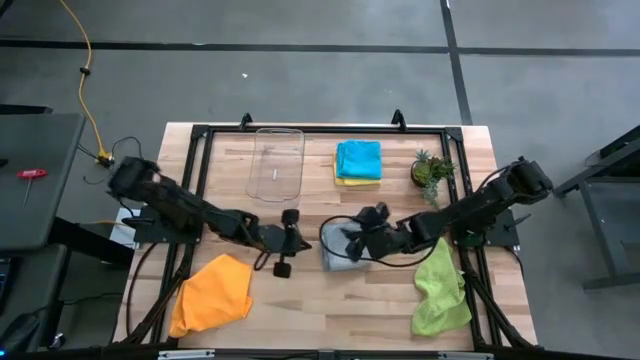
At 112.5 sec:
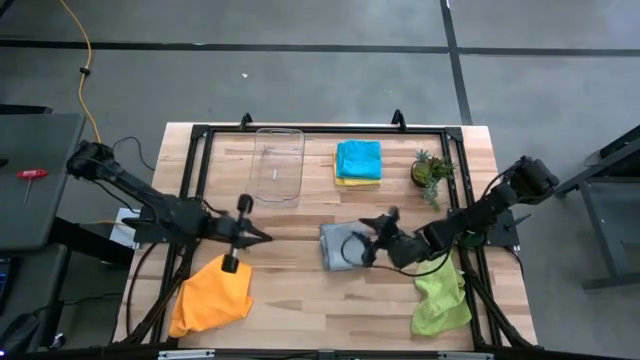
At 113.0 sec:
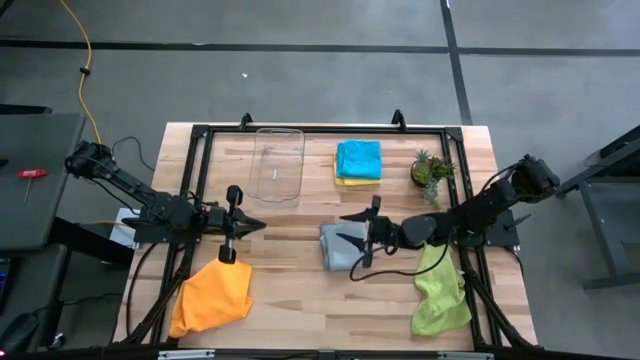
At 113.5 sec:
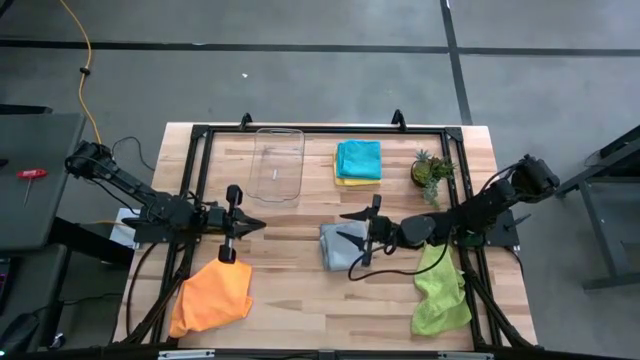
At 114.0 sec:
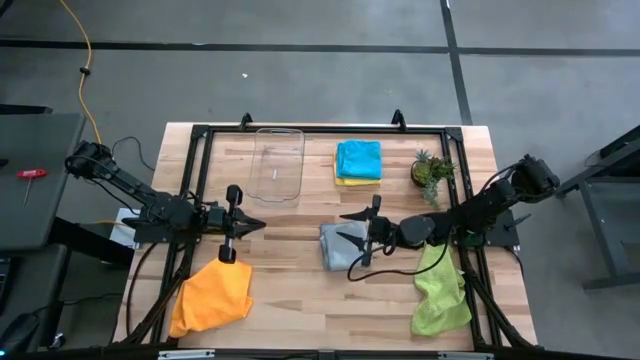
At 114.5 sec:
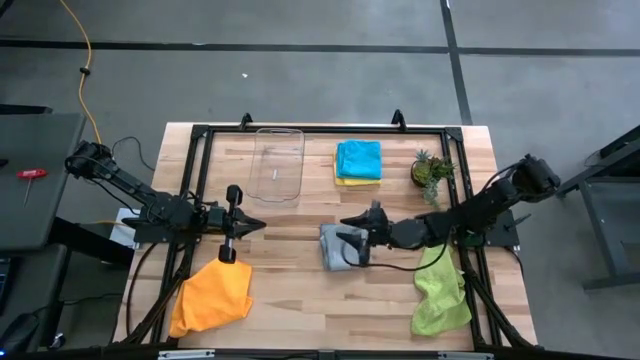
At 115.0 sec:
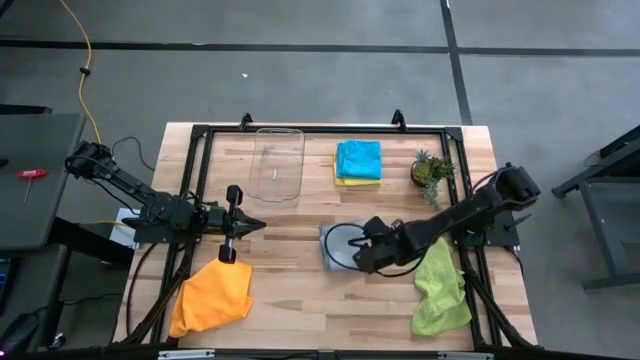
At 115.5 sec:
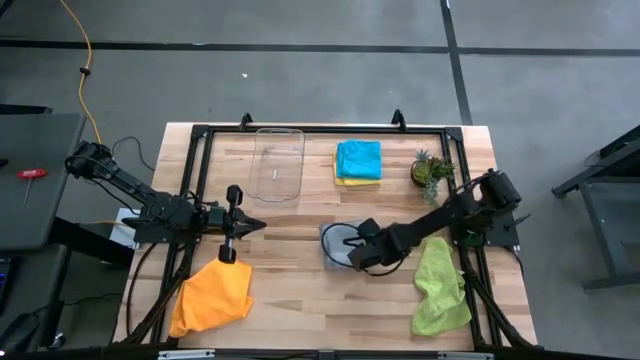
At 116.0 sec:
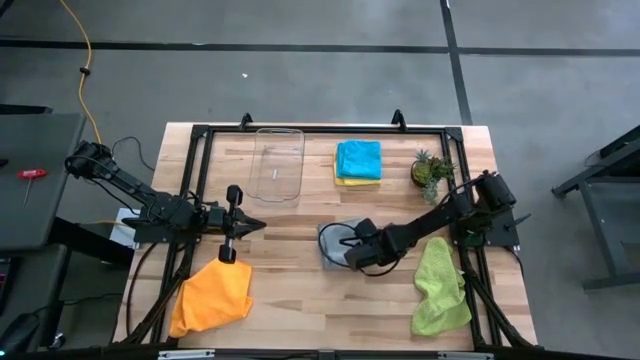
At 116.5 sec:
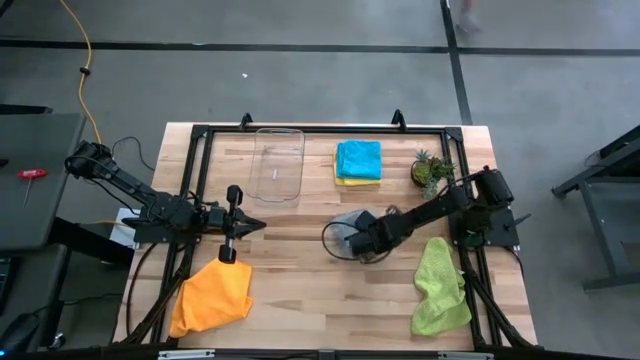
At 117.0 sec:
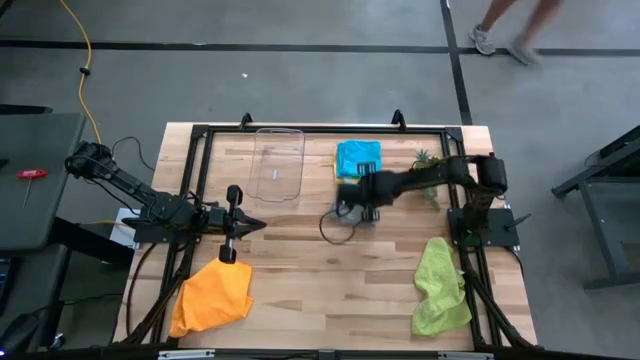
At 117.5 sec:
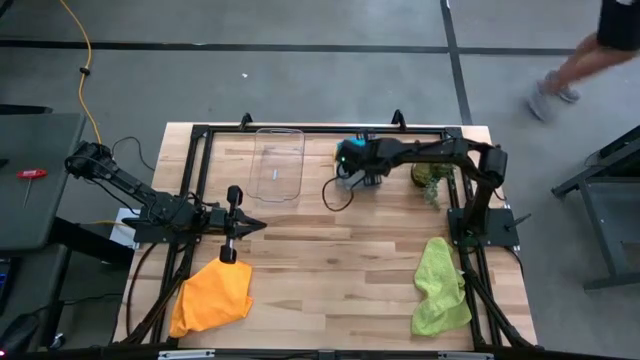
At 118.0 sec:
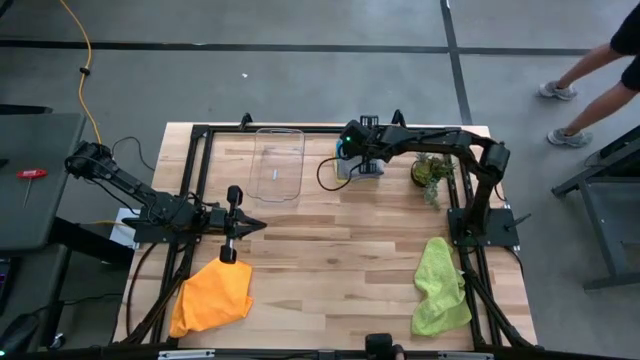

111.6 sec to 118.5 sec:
Task: Fold microfiber towels
Stack the gray microfiber cloth on the blue microfiber cloth

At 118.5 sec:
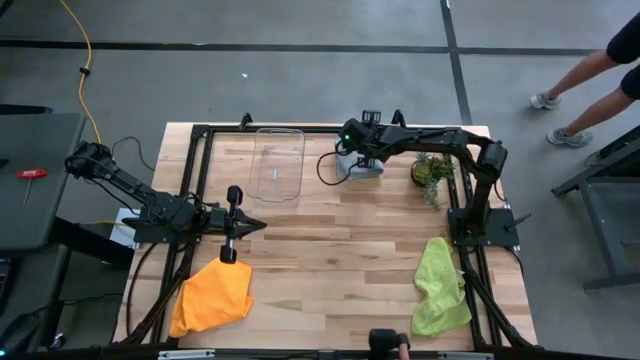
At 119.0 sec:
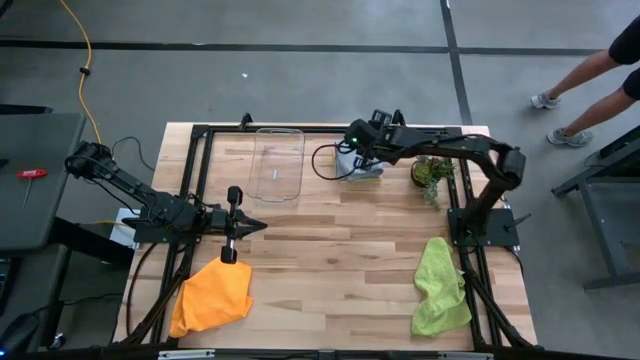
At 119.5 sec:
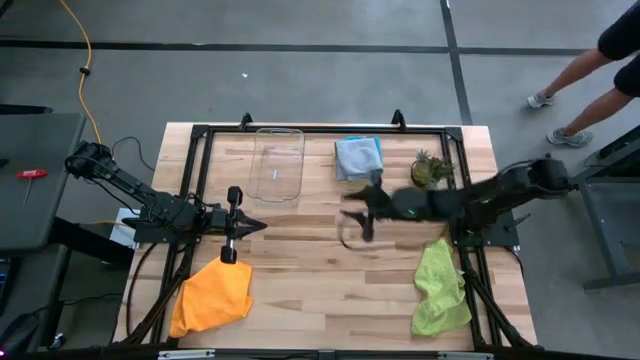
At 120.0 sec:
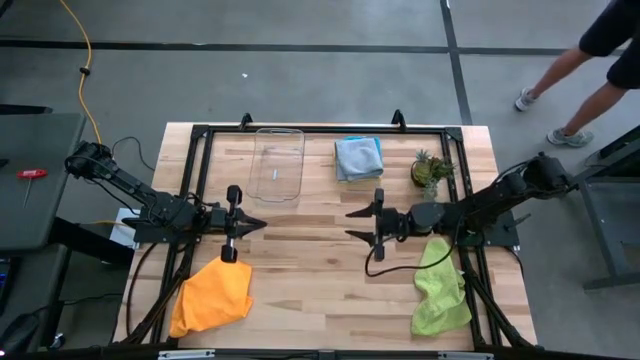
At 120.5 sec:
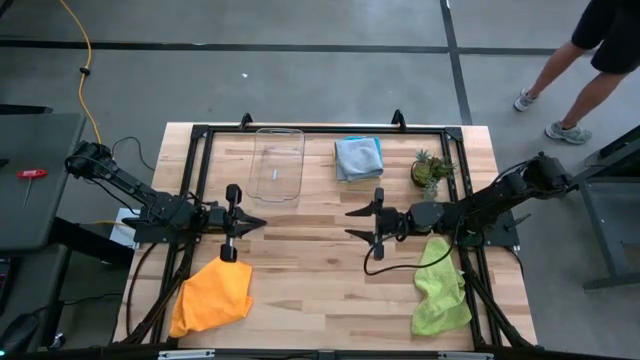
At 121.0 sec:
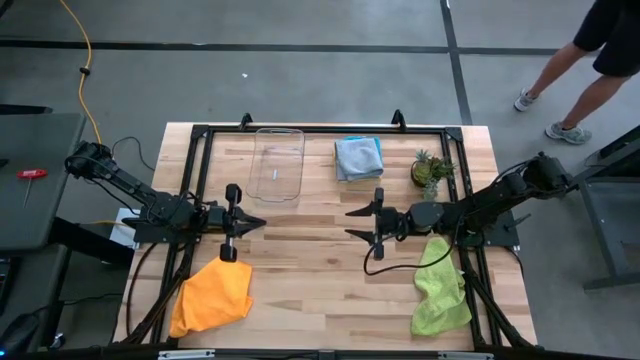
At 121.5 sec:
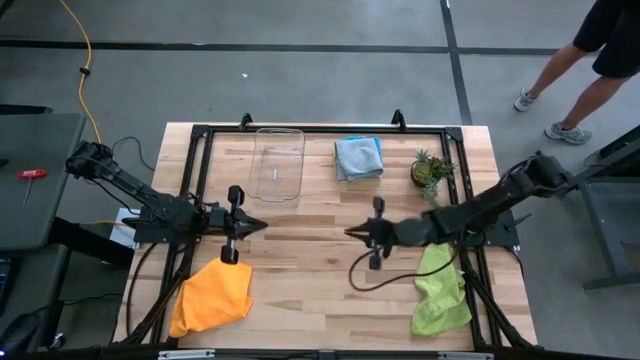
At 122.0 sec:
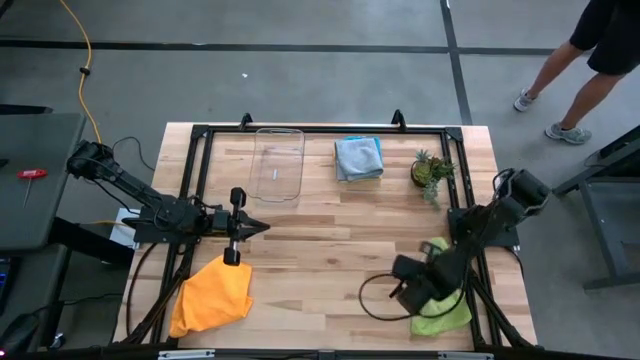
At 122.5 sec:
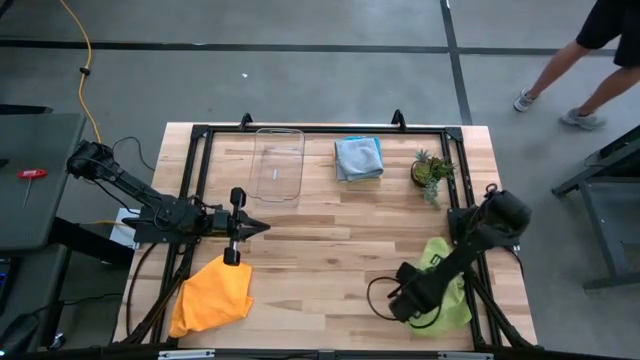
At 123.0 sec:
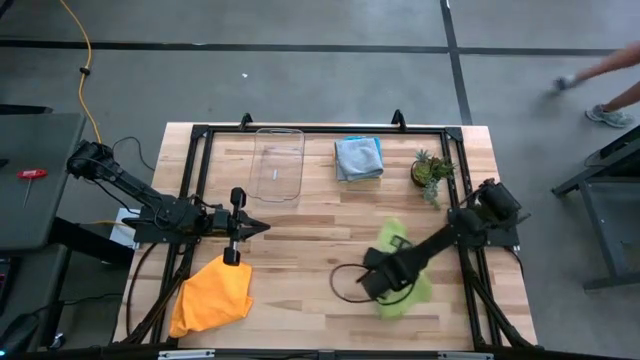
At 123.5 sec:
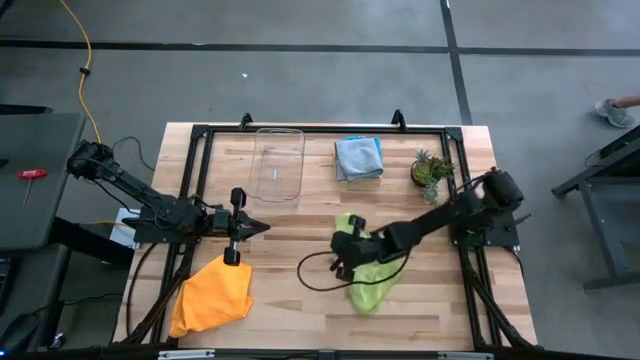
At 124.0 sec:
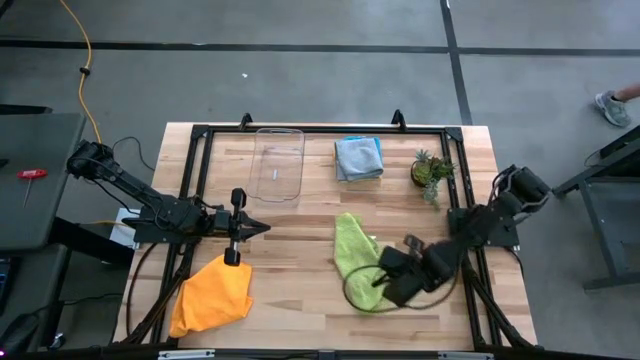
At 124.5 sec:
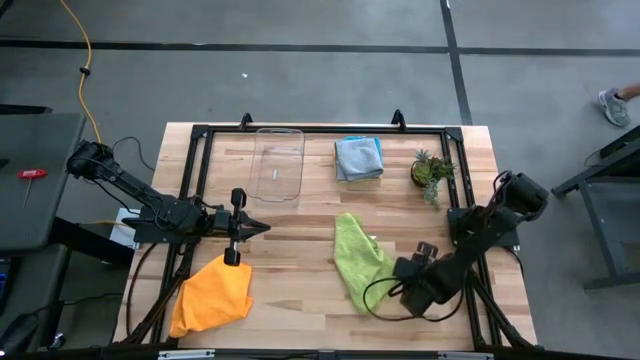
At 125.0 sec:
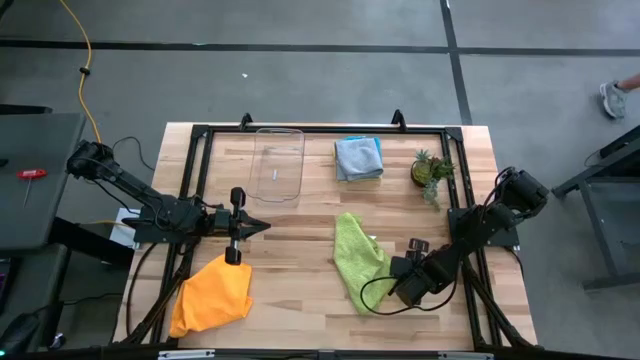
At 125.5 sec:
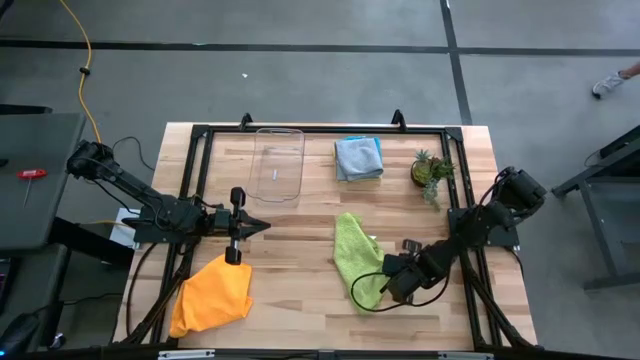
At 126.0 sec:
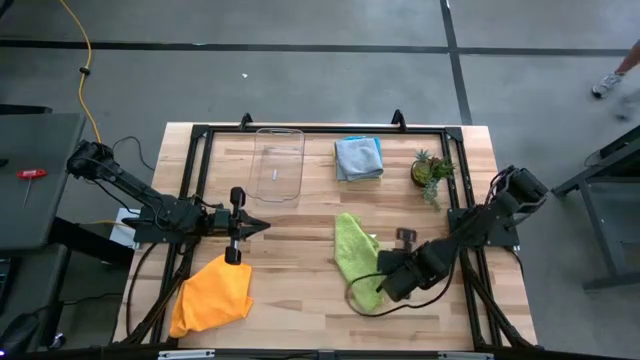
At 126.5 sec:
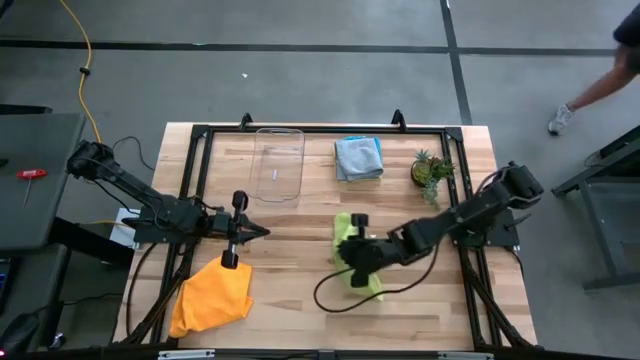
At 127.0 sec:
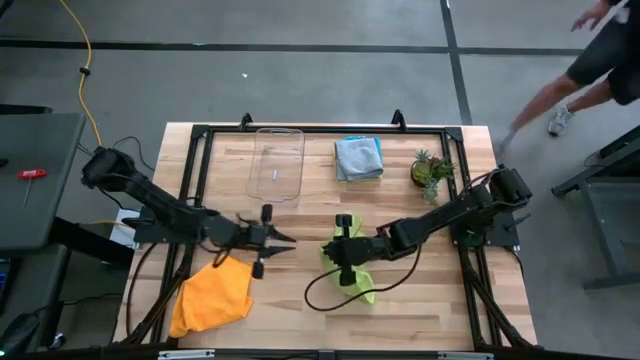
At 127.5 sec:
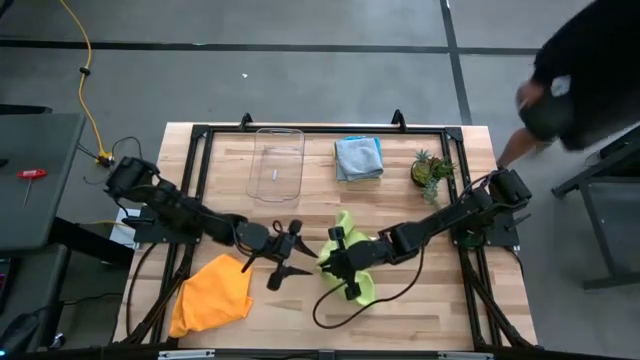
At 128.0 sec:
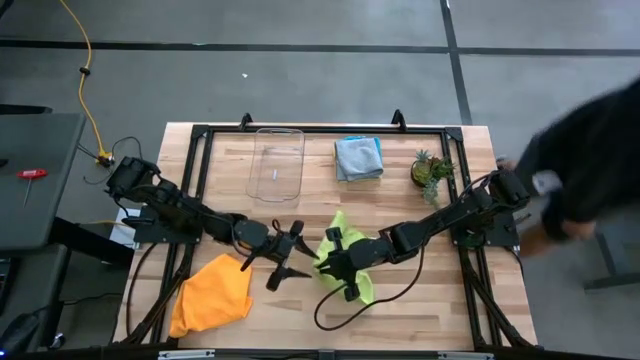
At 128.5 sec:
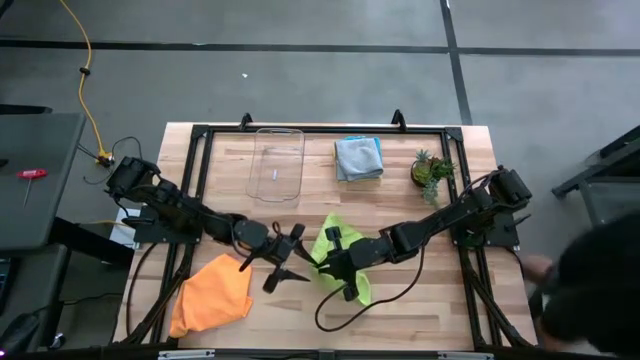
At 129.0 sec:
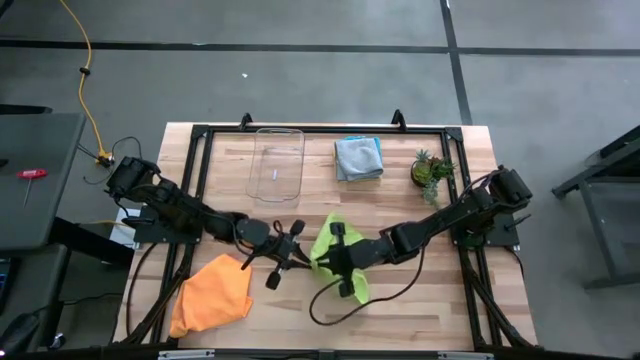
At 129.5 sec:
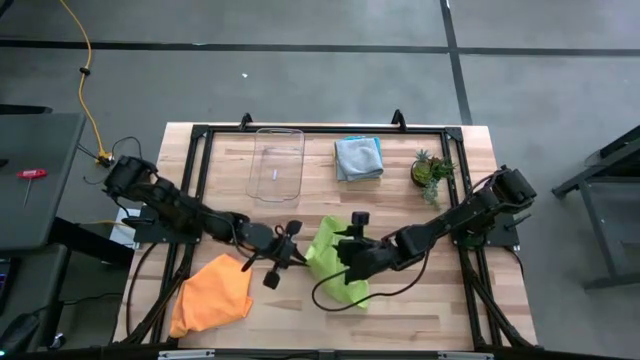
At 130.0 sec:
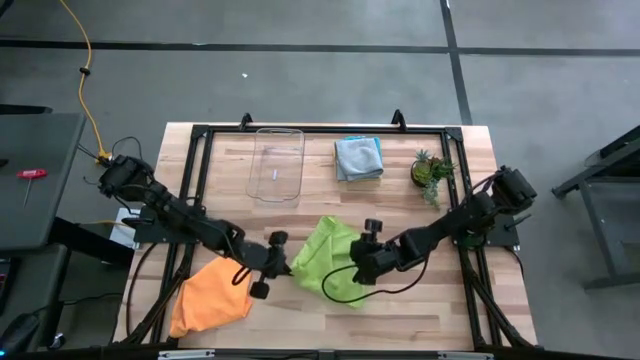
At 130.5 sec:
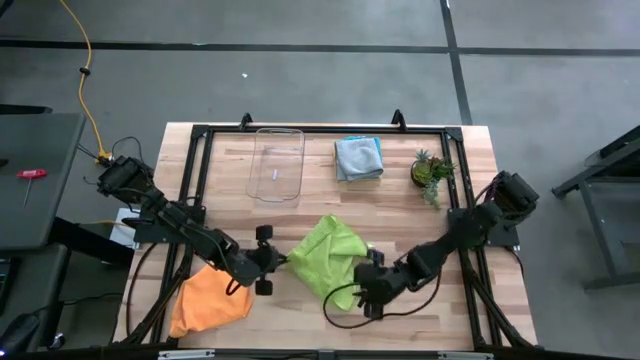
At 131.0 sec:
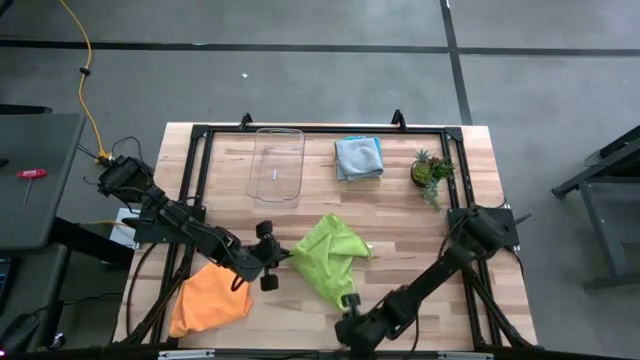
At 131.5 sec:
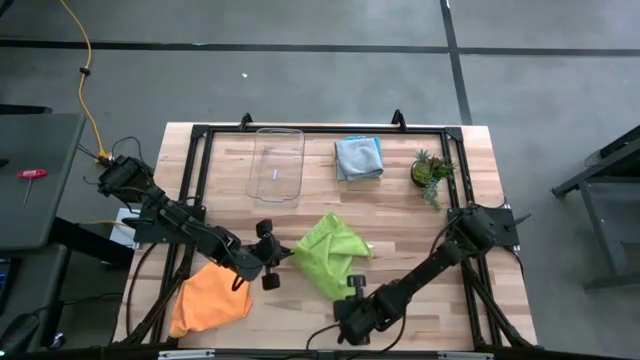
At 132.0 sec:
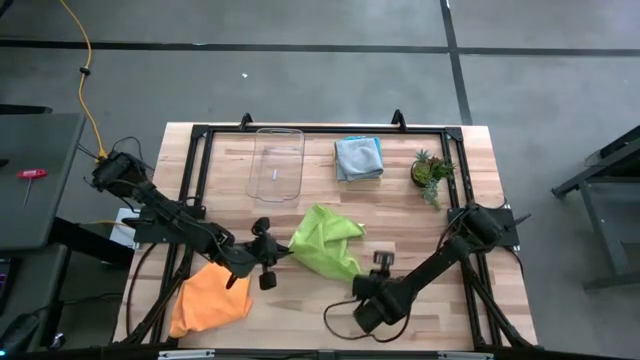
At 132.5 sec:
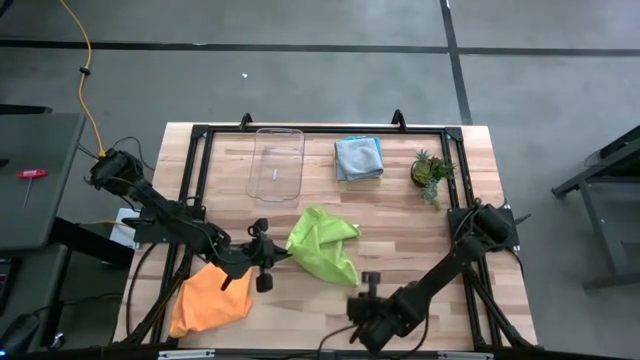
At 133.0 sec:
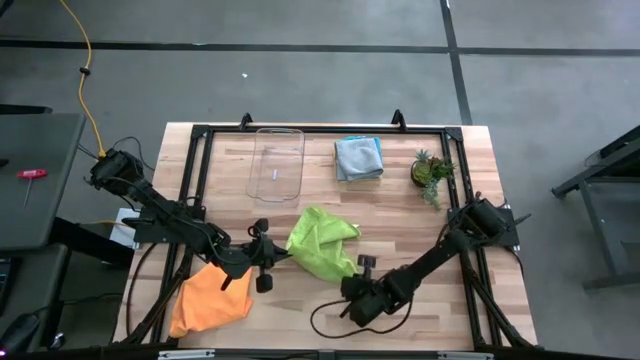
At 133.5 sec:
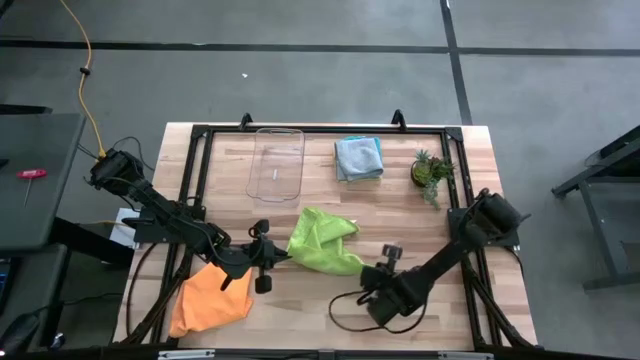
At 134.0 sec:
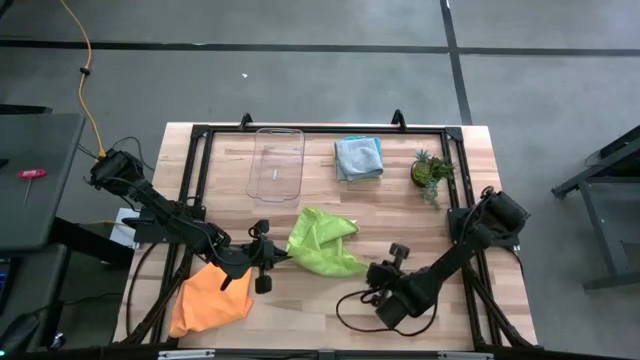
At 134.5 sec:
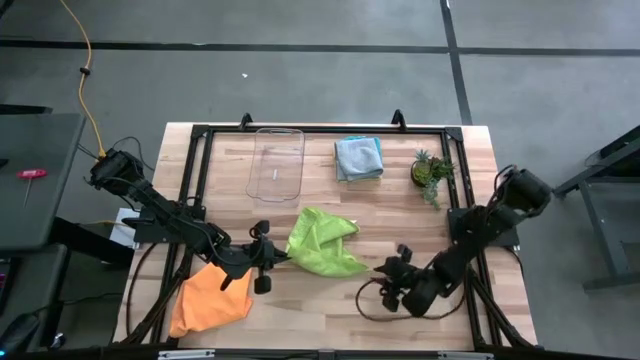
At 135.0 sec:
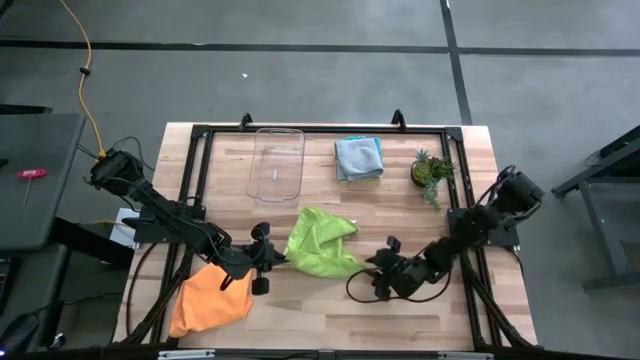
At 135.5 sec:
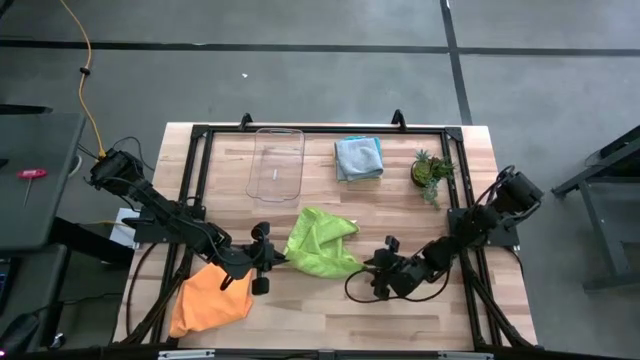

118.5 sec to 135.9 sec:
Fold the green microfiber cloth
